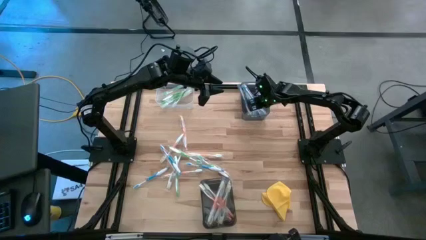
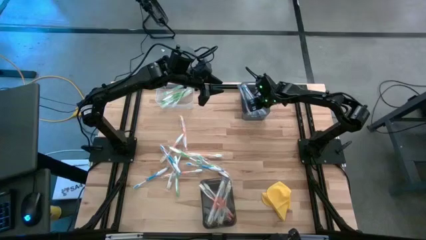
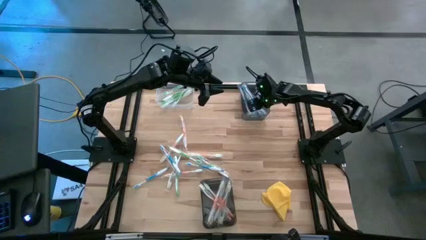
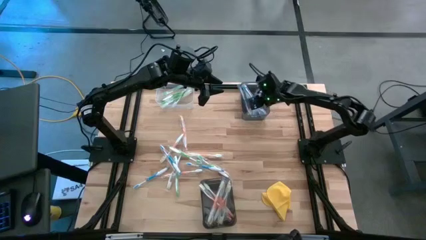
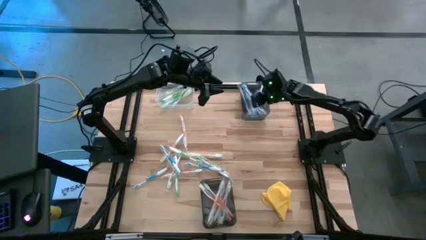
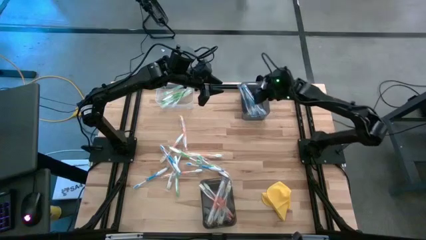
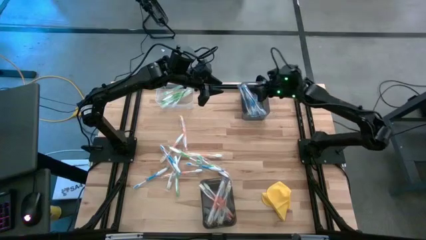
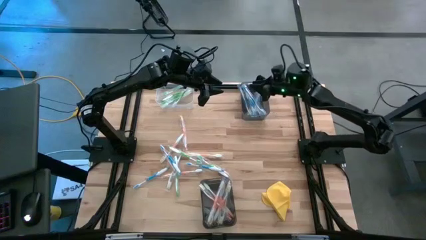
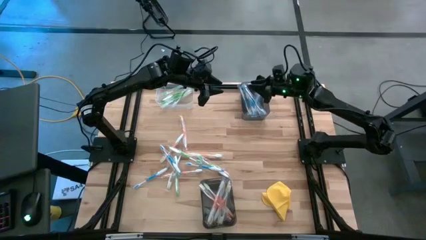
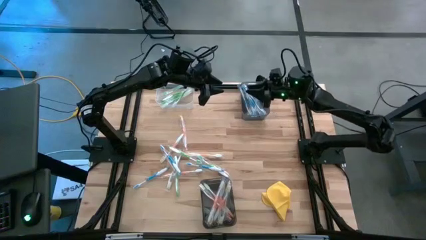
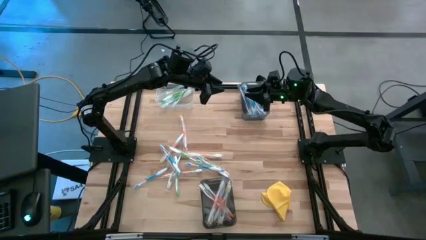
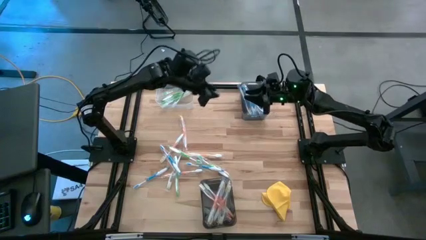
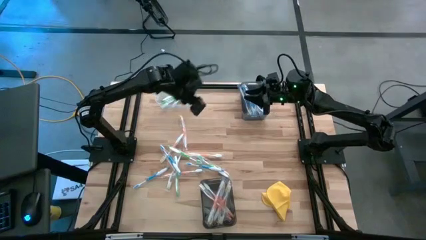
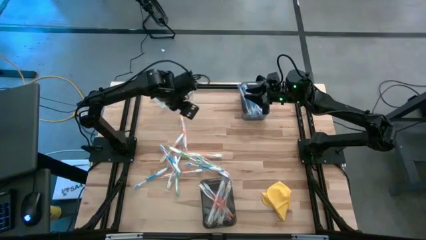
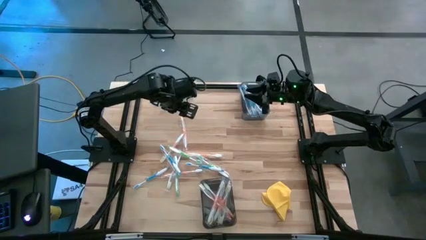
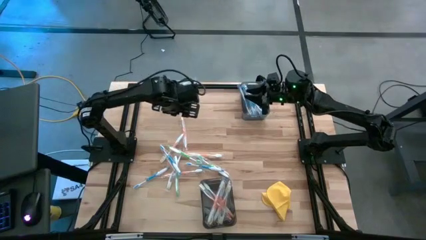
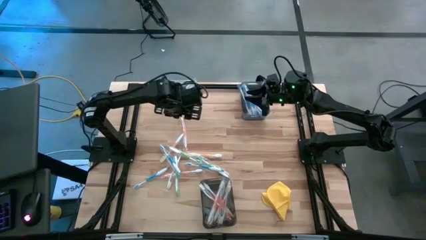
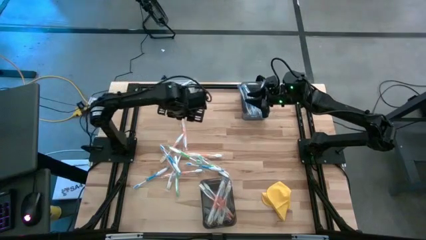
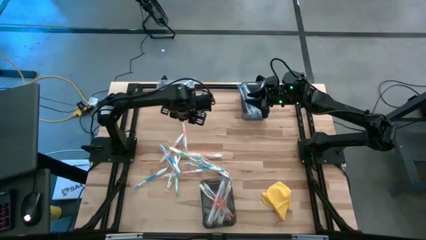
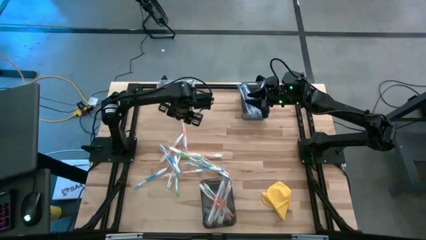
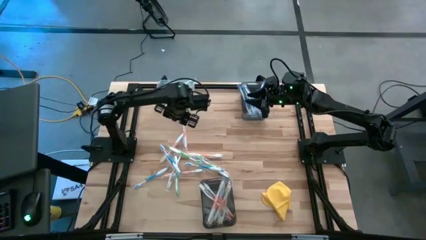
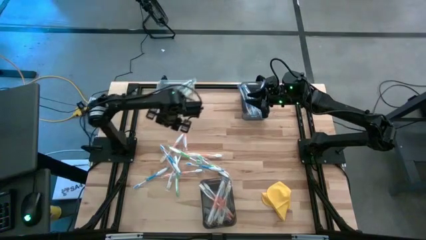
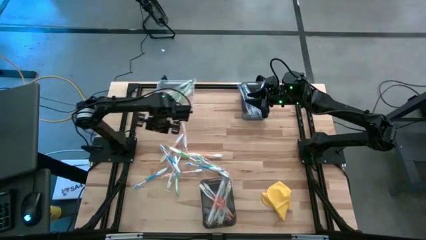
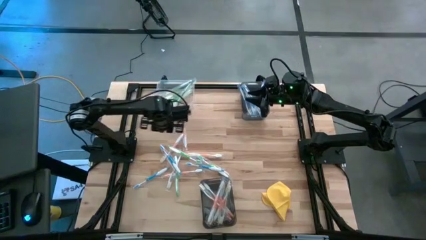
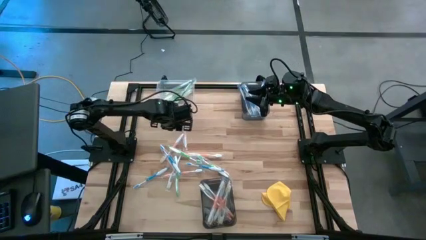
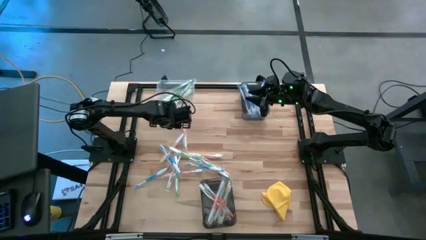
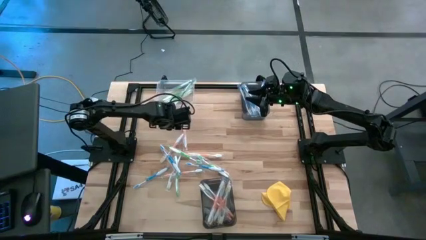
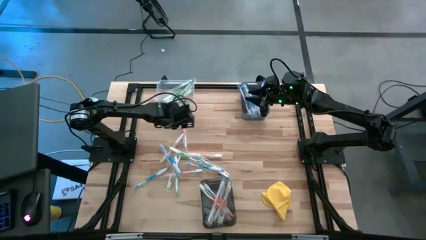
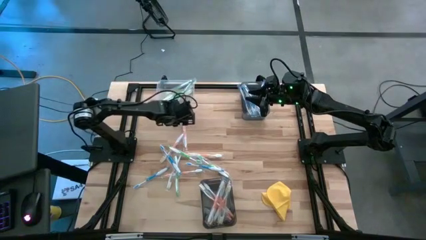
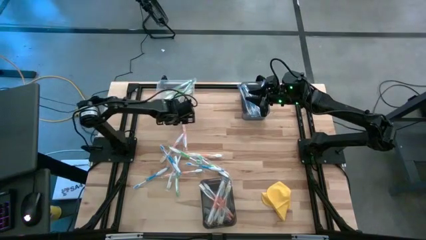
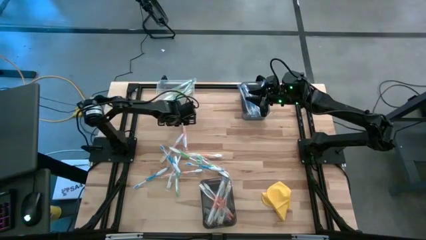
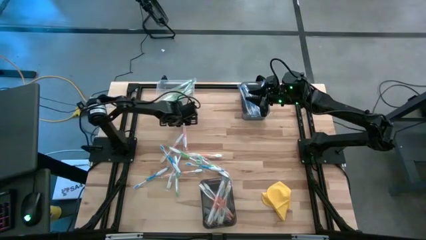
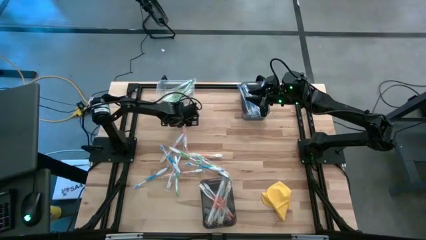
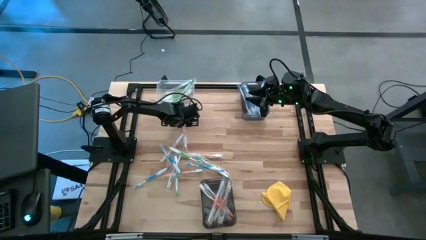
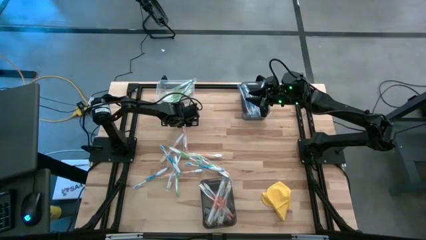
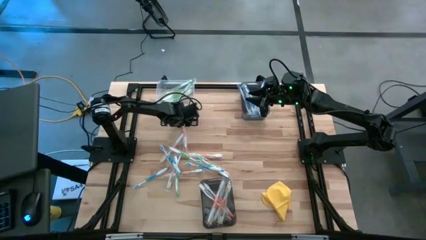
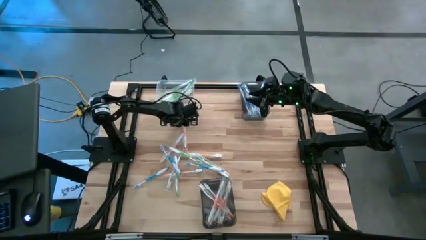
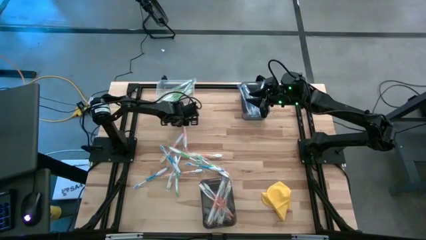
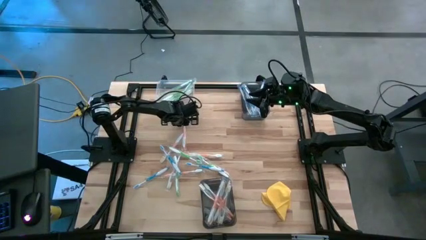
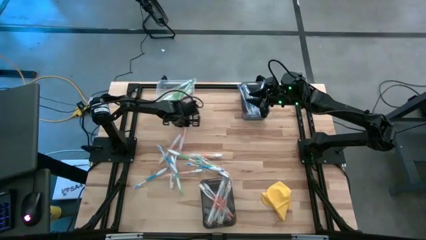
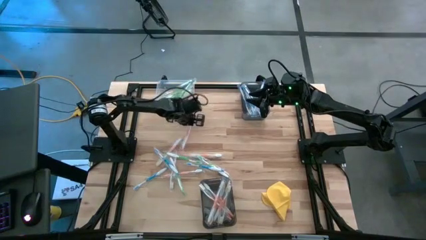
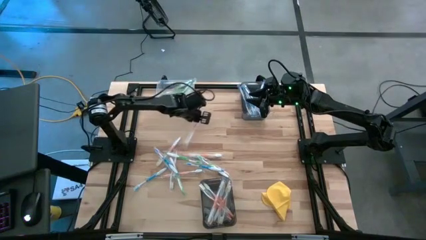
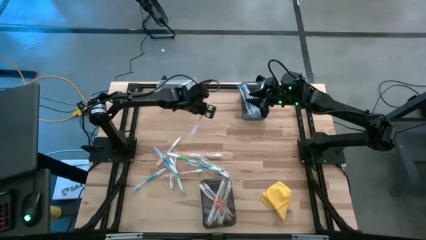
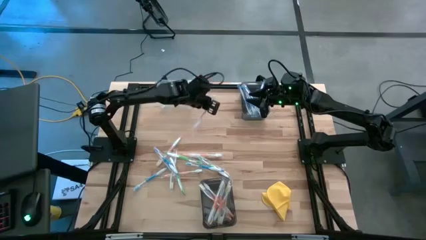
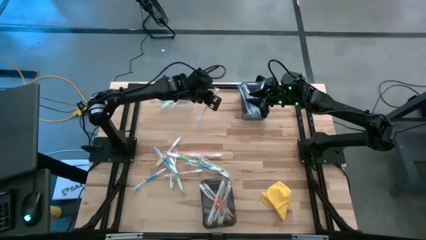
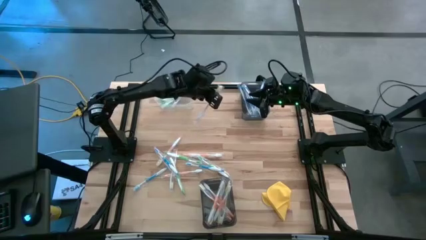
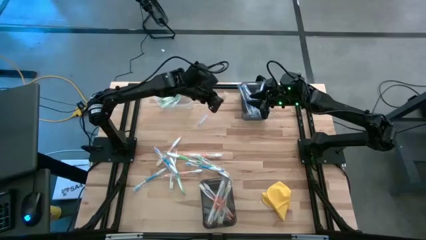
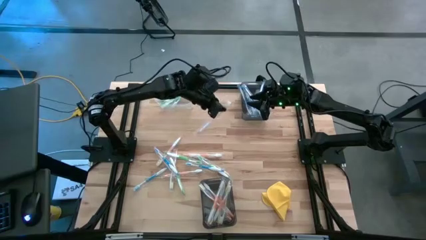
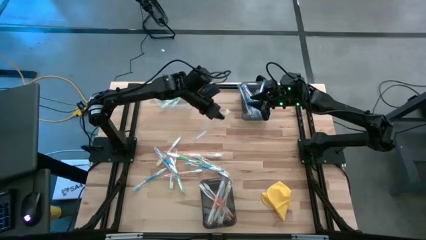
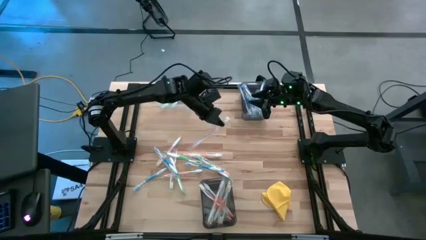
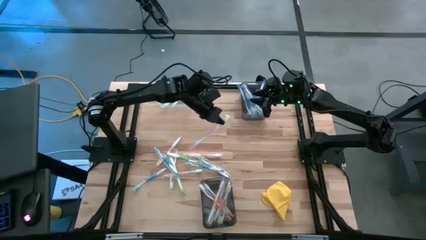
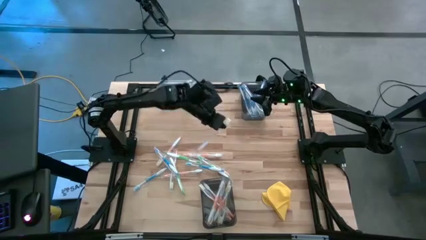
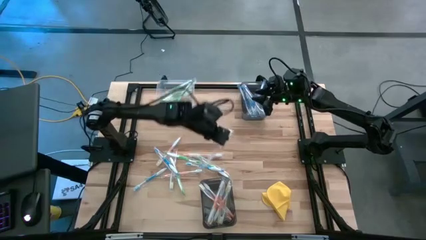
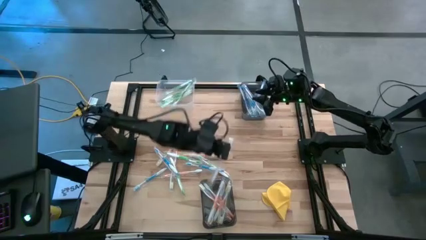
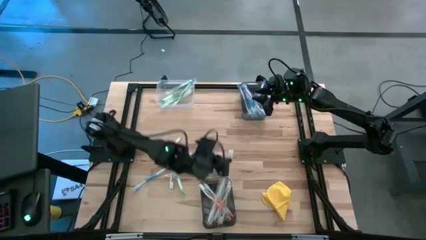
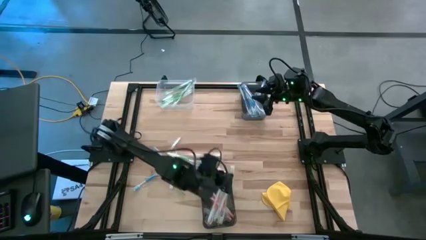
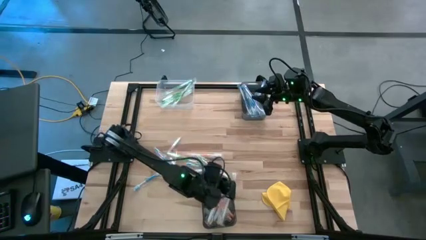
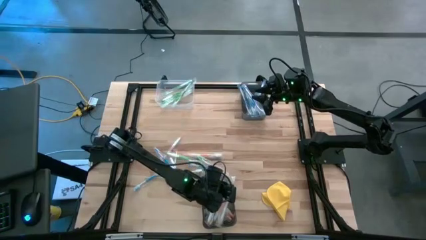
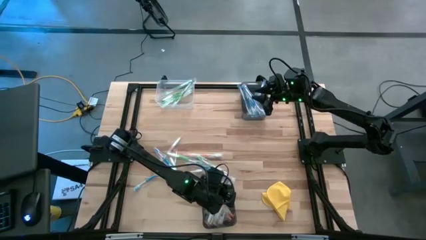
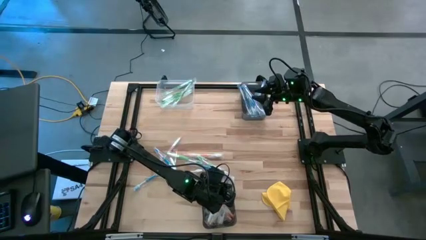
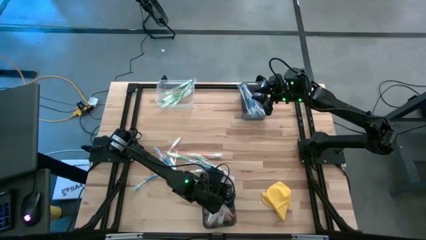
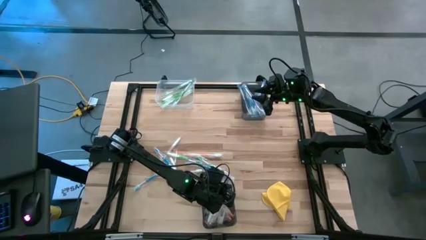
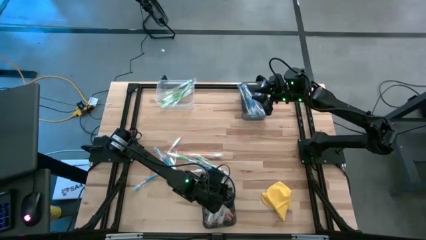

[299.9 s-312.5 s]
Task: Pick & Place Toothbrushes
Put the orange toothbrush into the bottom black bin

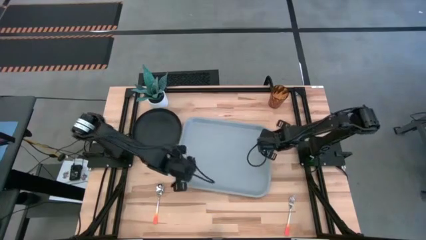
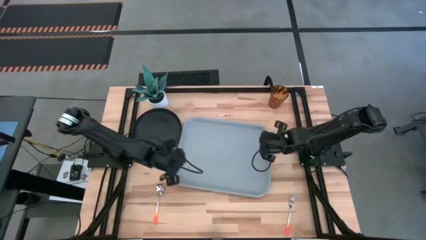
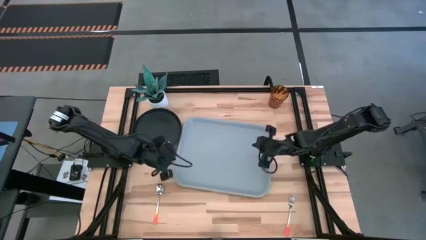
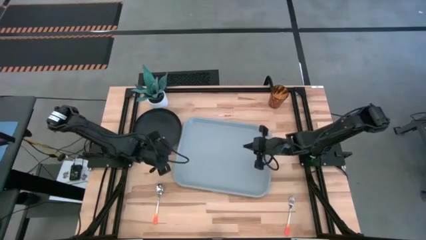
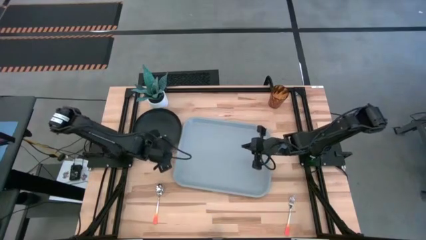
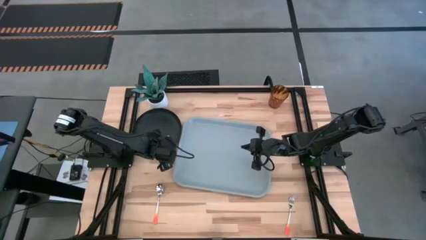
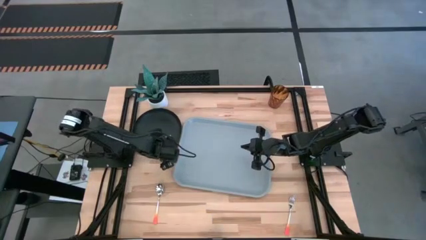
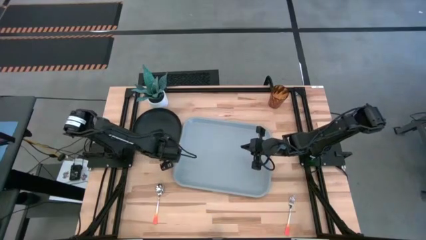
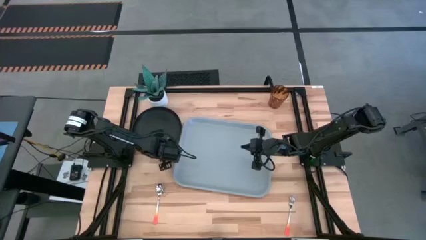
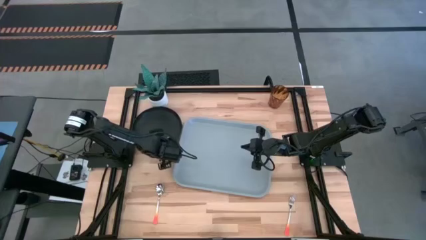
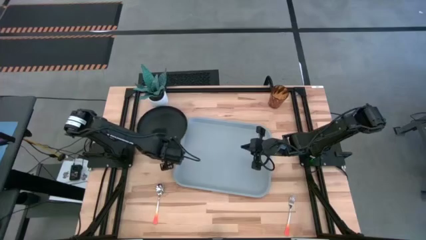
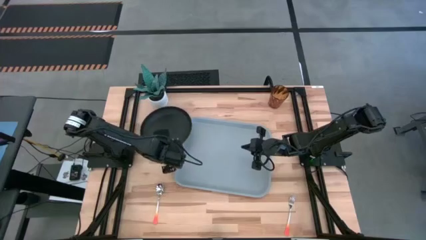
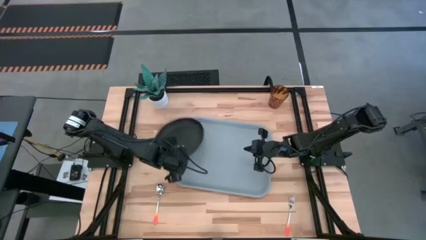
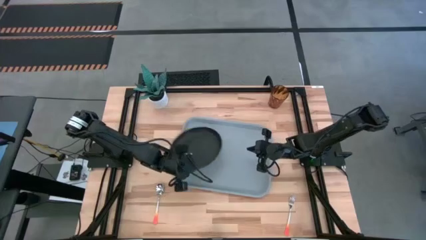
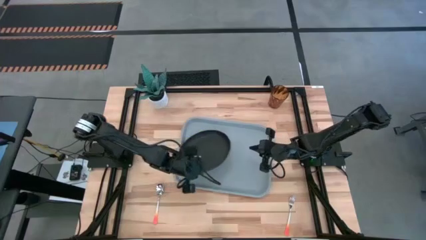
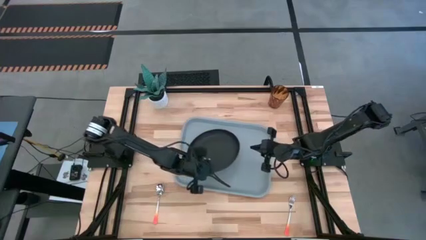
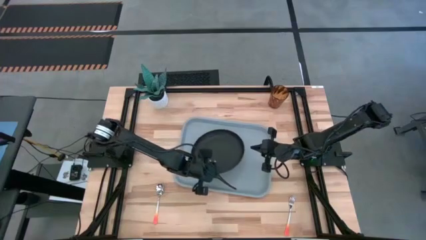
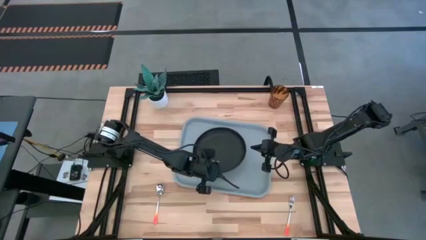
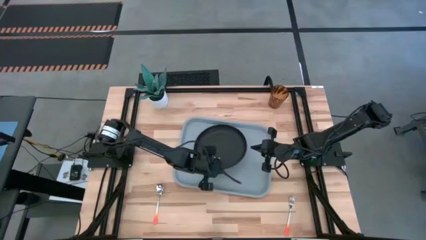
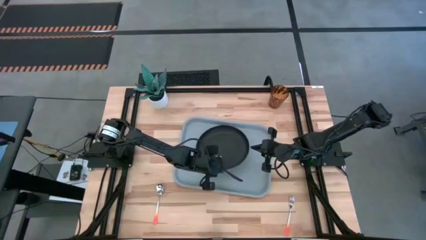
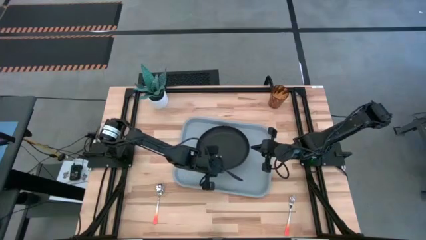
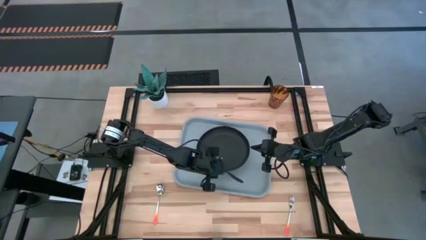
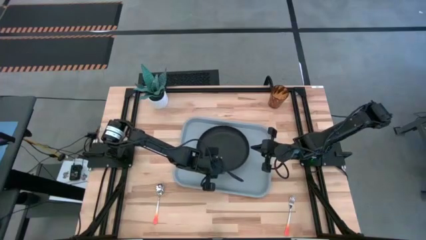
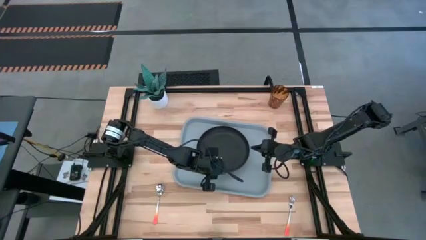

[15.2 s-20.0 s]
Task: Pick and place plate/cup/fork/spoon on tray
Put the black plate on the gray tray
